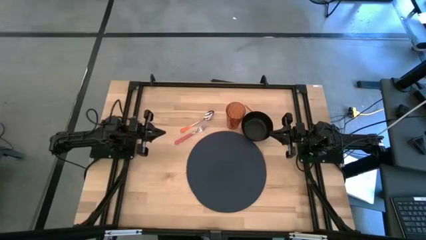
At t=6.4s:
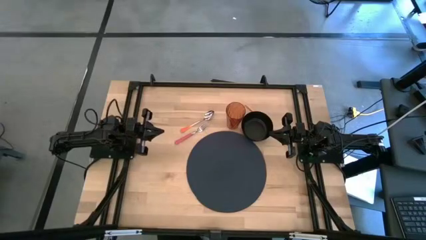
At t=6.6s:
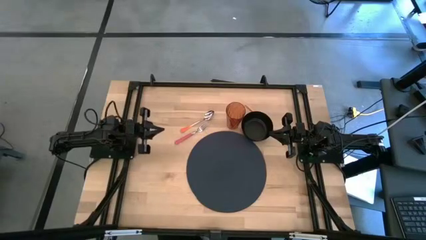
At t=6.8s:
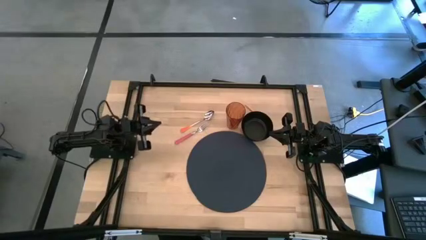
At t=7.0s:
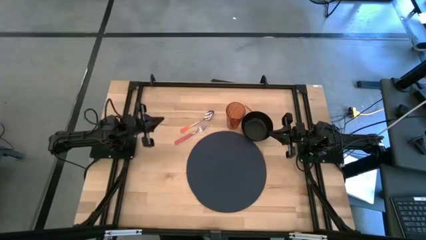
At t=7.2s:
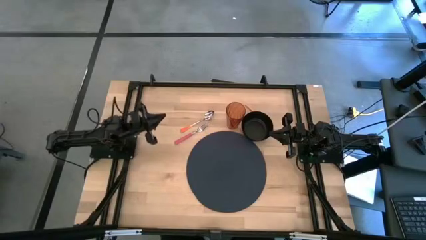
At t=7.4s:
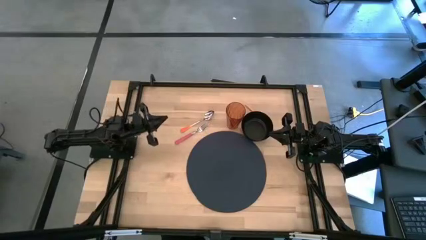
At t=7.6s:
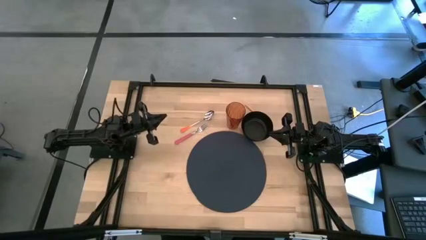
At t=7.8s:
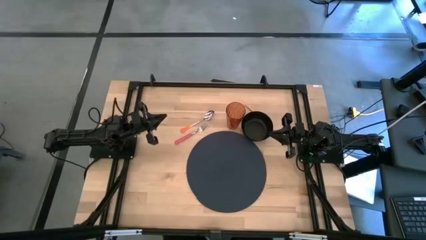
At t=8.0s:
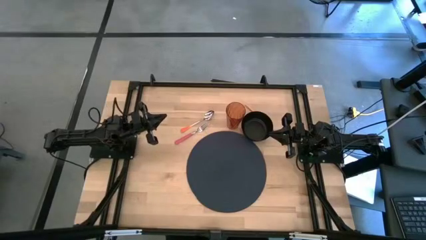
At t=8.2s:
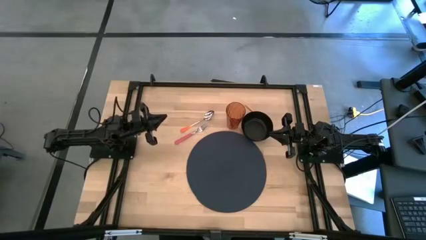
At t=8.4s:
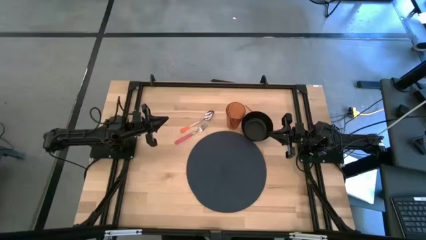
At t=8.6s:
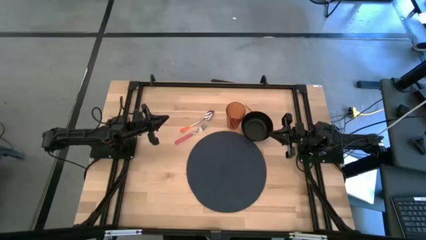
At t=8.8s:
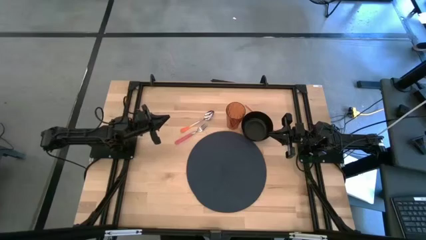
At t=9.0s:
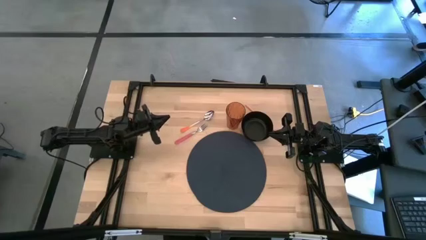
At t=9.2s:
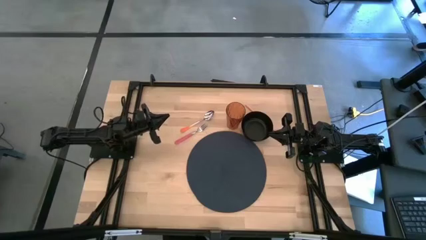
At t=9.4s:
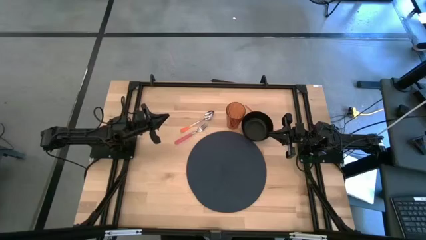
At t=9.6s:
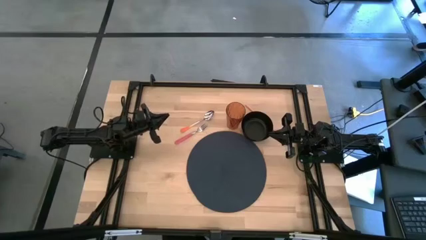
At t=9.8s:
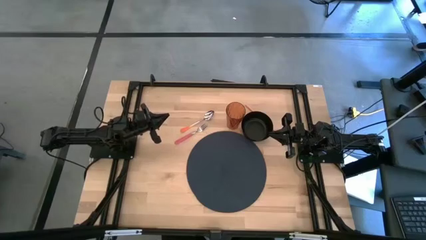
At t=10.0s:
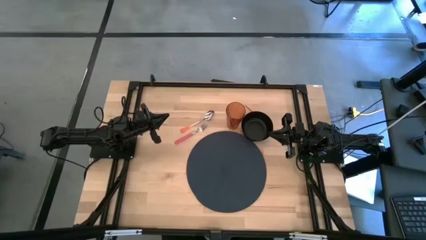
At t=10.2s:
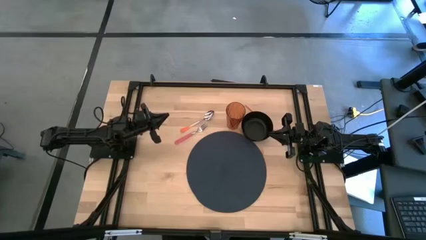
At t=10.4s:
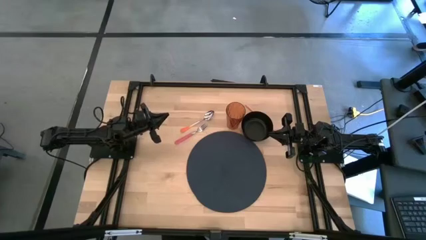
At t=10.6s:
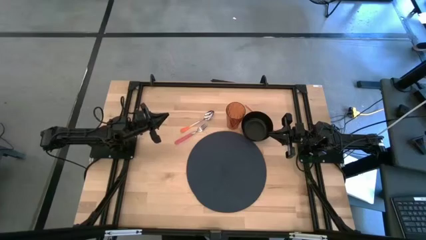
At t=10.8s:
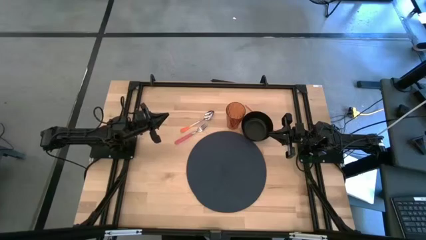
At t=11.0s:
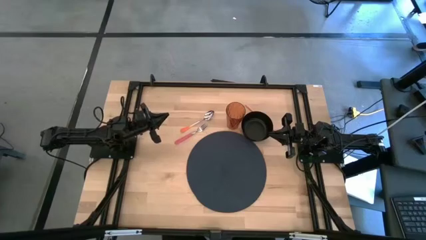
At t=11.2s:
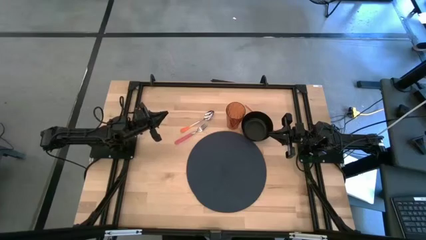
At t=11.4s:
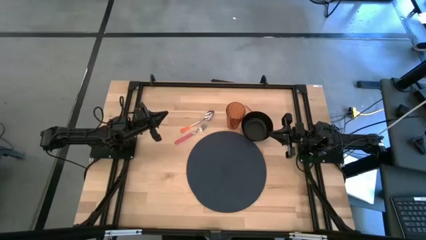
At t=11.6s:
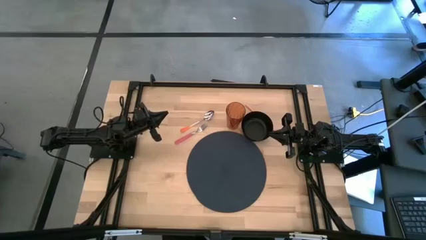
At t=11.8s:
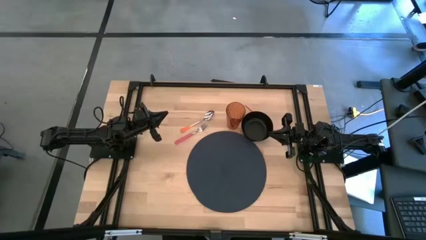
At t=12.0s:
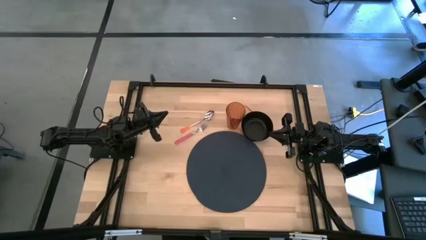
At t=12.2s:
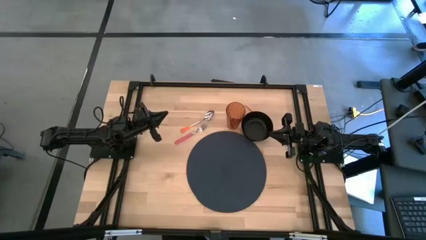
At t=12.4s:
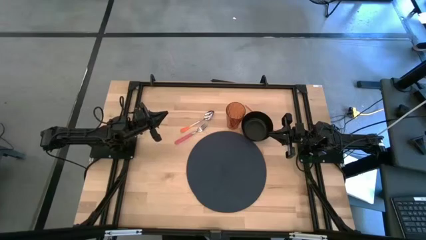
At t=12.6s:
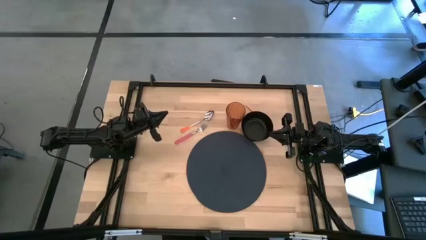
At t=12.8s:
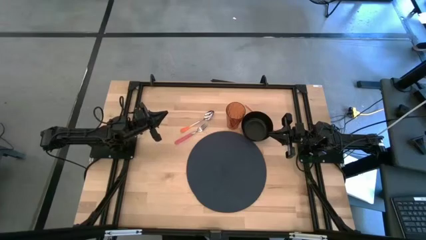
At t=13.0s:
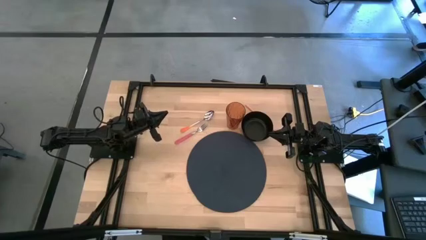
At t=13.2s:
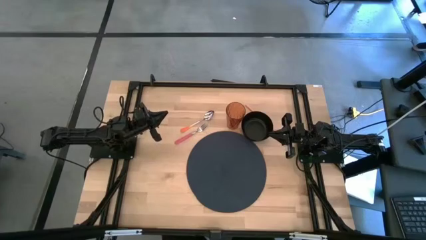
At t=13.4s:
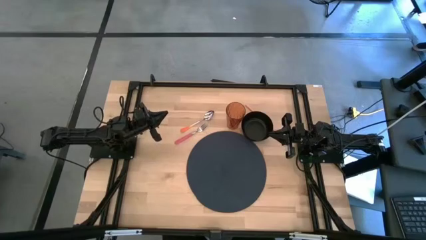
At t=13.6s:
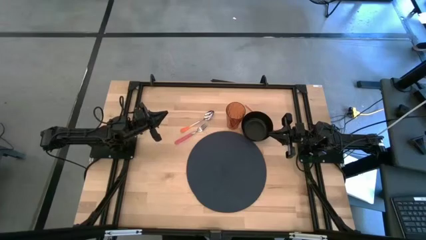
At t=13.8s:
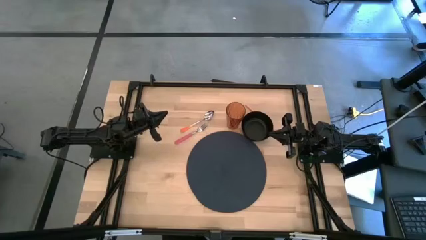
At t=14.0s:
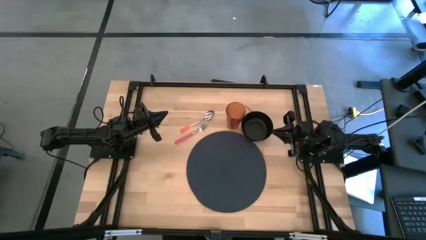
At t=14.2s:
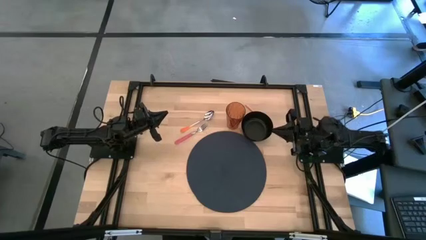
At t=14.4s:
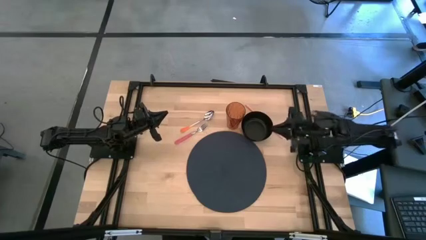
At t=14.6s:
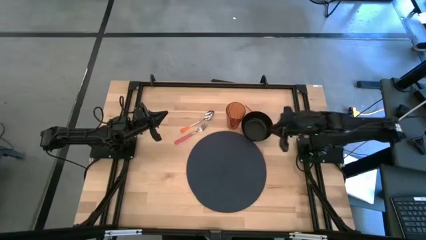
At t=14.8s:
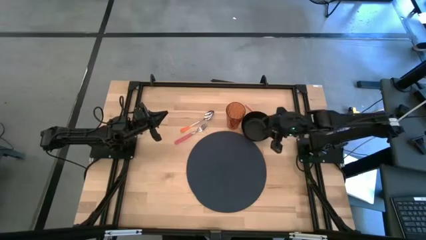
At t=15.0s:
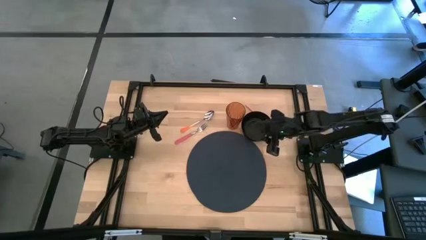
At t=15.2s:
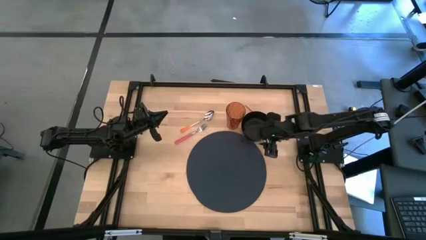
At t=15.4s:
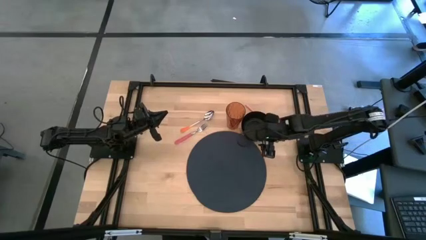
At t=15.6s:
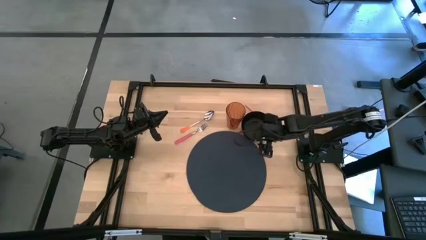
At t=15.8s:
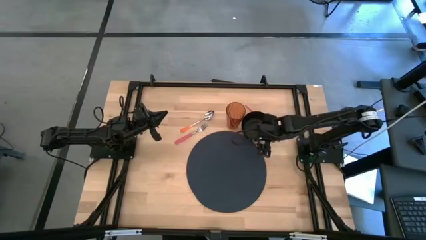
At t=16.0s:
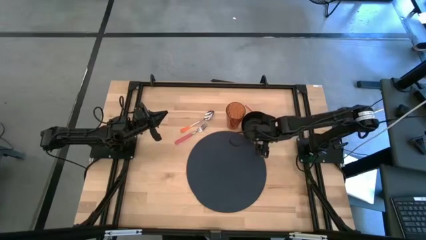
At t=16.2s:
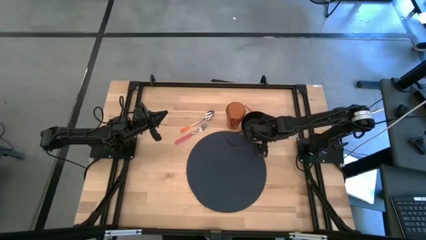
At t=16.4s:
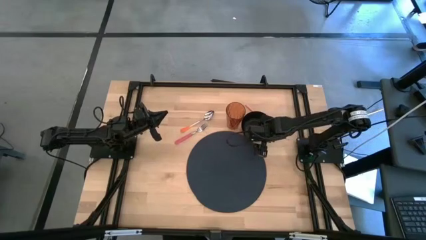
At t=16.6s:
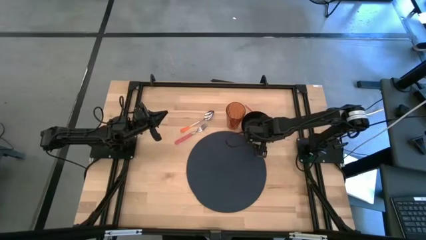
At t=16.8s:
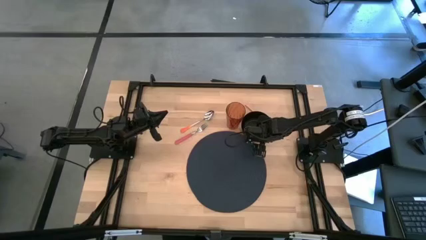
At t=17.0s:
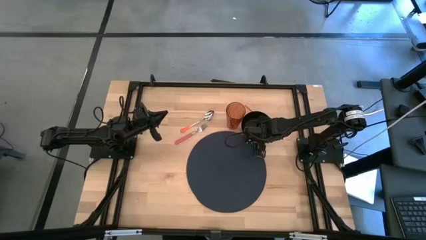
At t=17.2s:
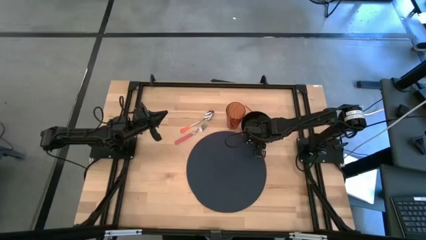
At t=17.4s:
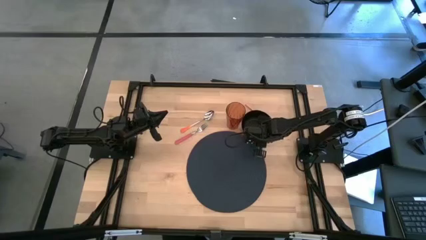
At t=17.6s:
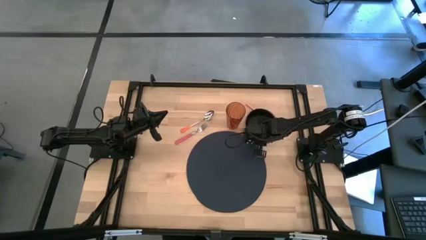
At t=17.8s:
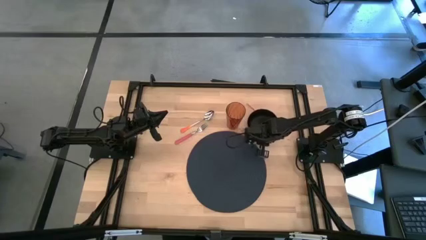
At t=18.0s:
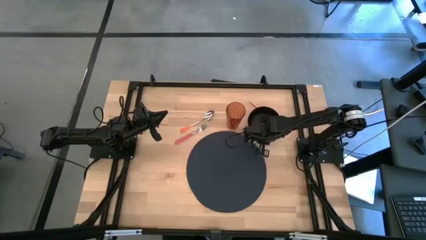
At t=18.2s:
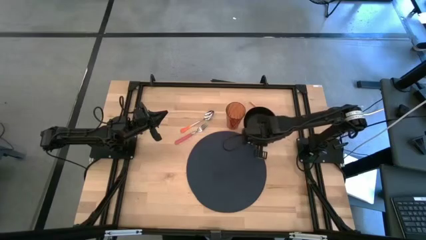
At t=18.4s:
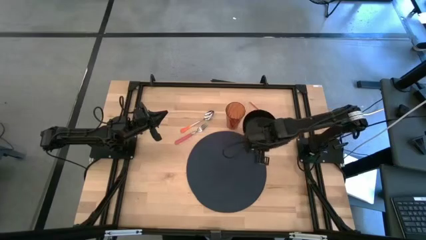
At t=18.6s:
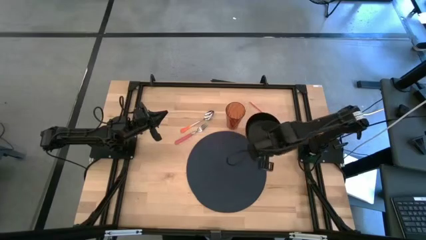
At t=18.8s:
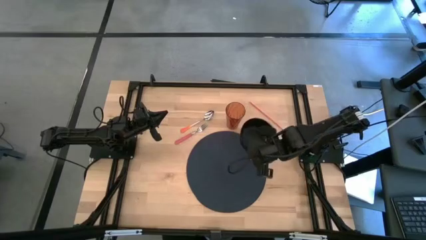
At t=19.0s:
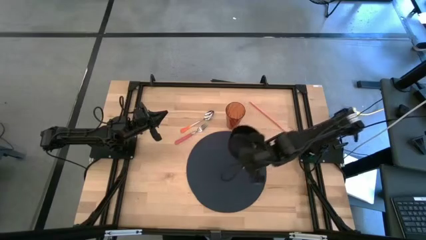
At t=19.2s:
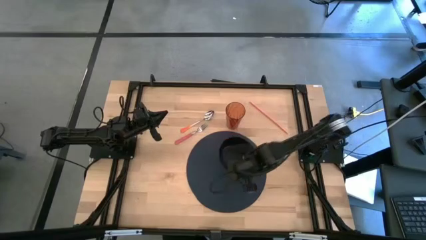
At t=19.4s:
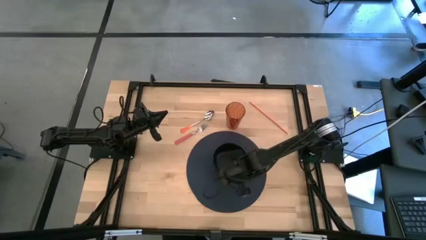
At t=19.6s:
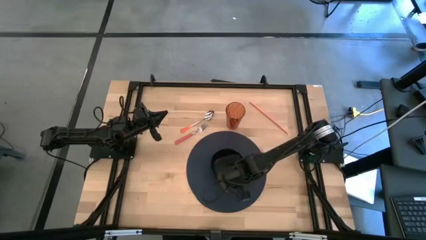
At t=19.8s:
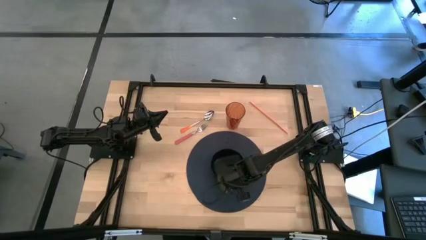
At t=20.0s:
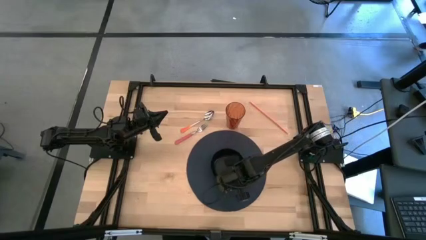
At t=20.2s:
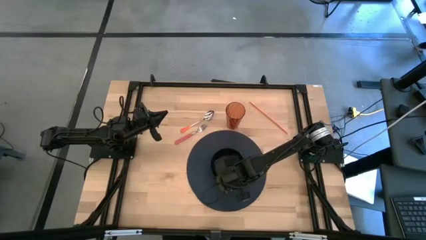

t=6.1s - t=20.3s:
Task: Pick & Place Utensil
Put the black bowl in the center of the black table mat
